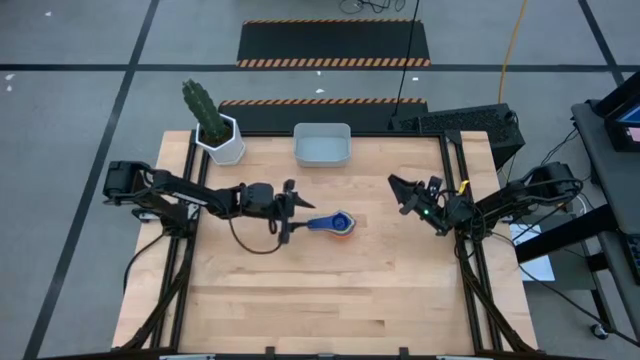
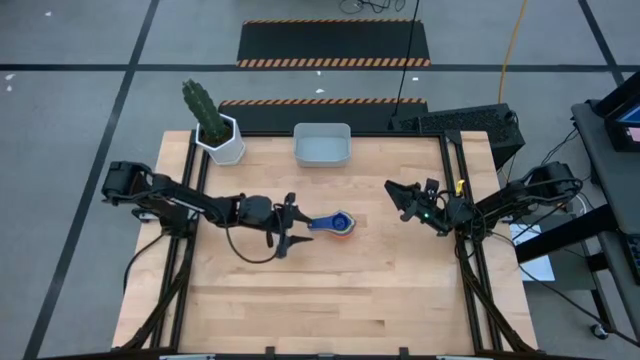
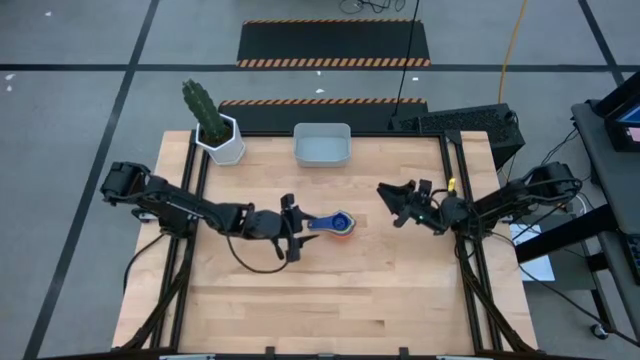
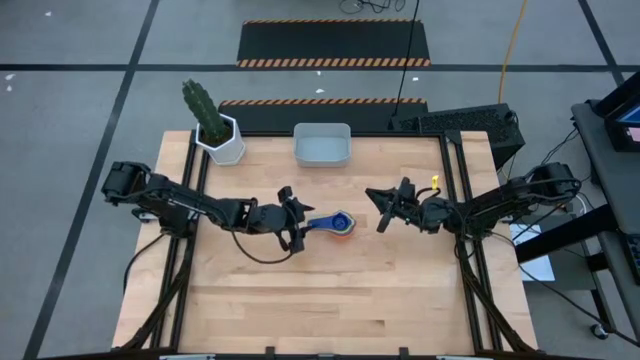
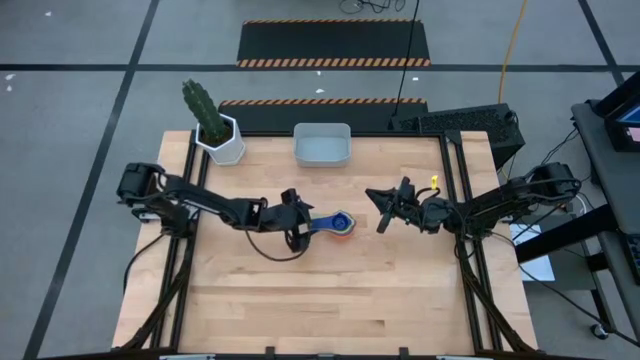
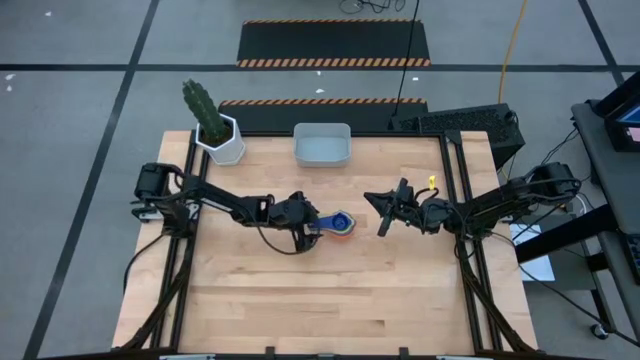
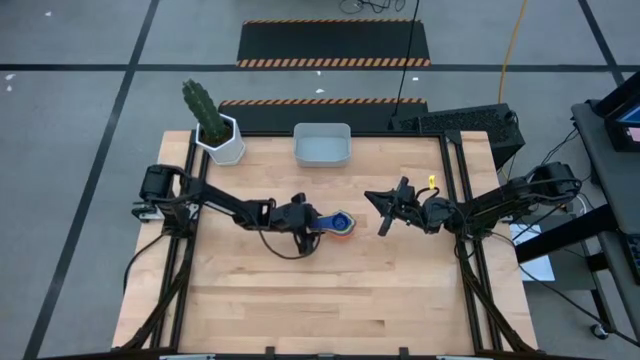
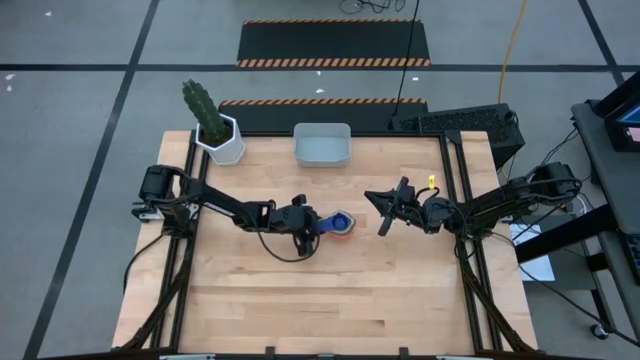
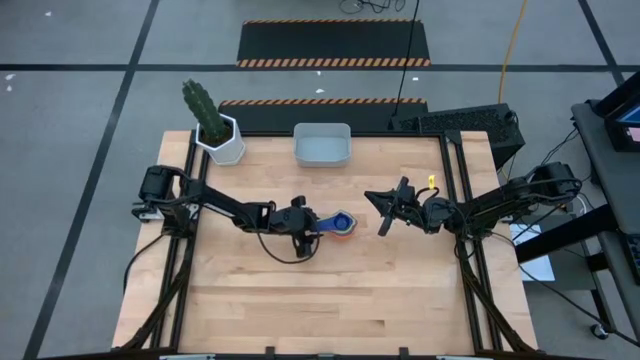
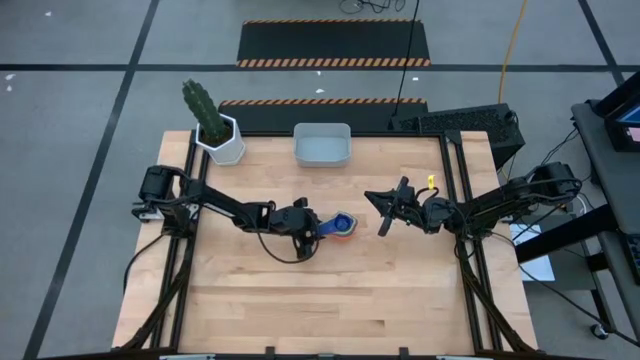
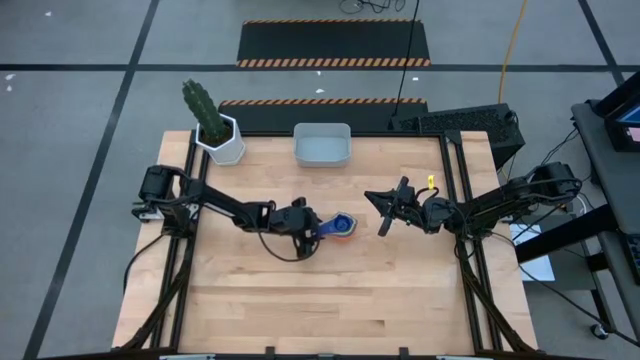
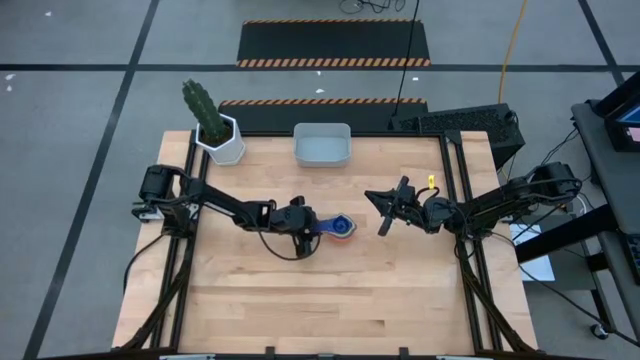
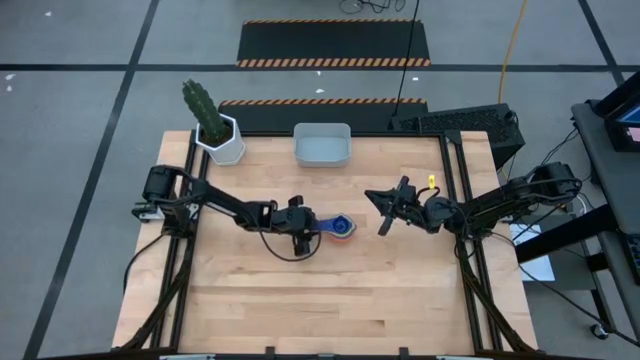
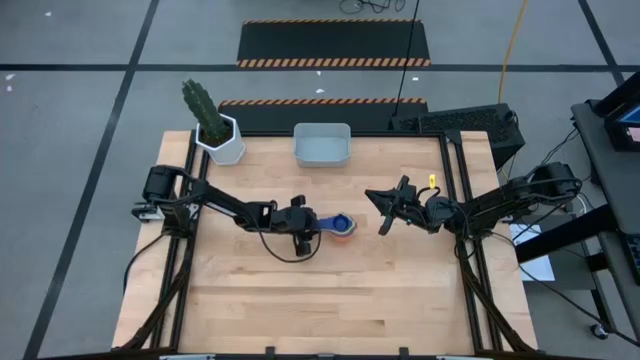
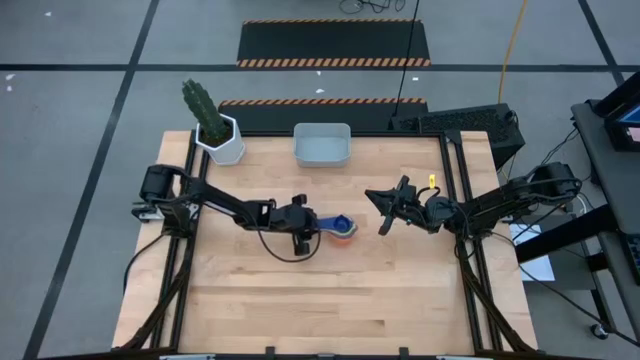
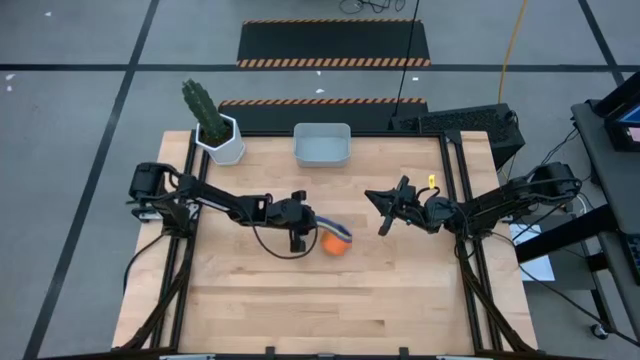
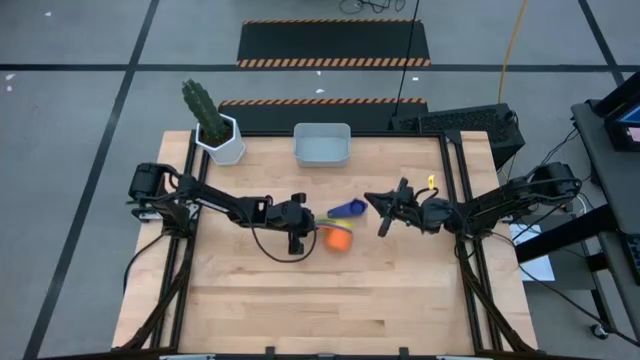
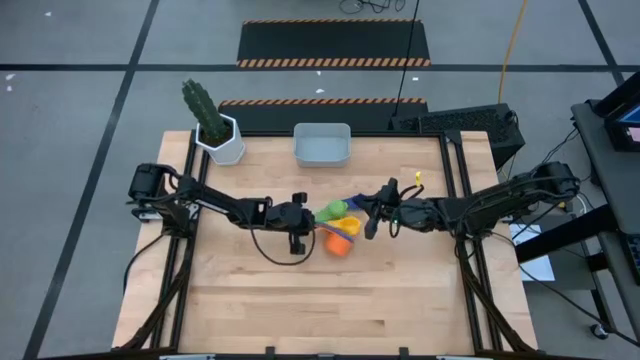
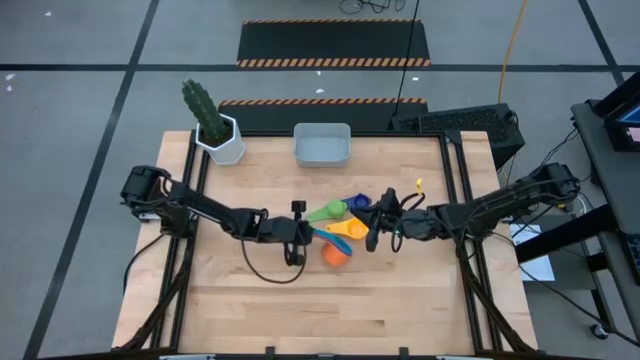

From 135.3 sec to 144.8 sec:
Task: Nest measuring cups in basket
Put the stacked measuring cups into the bin

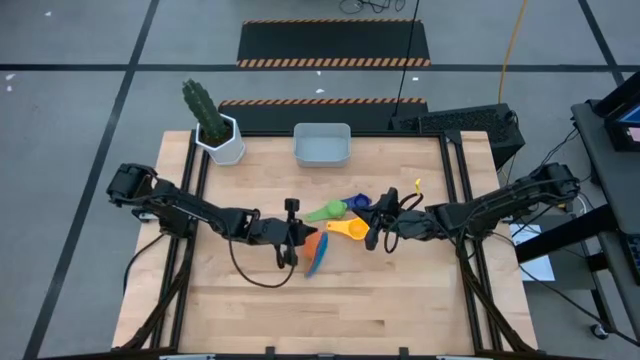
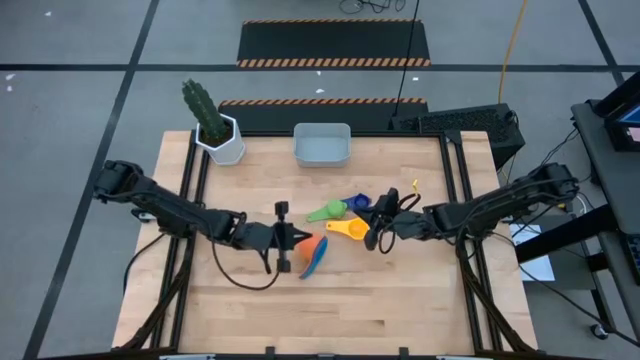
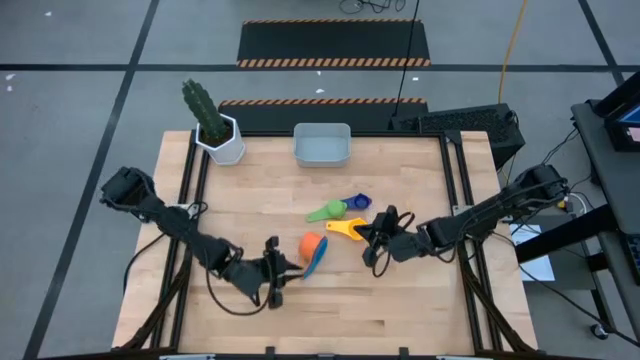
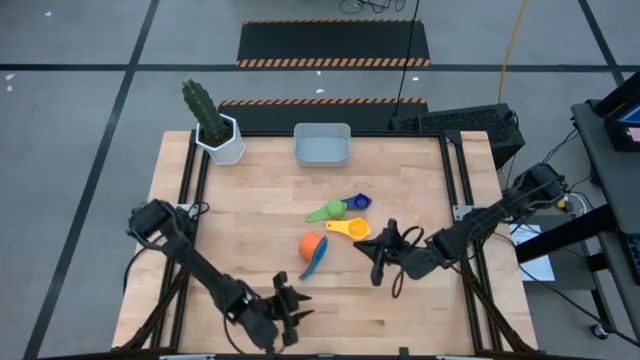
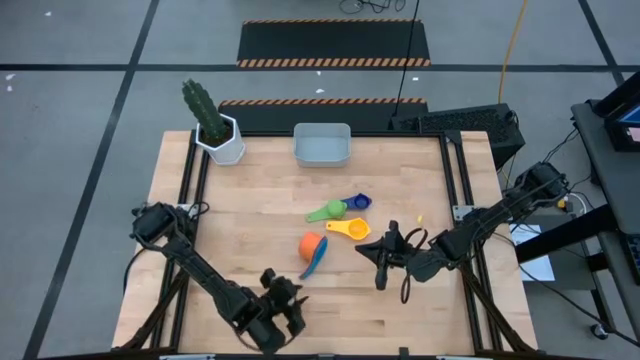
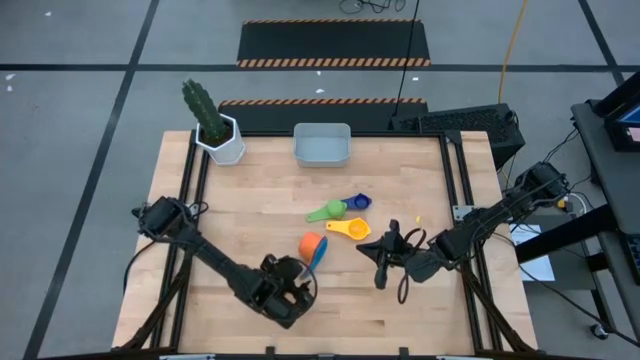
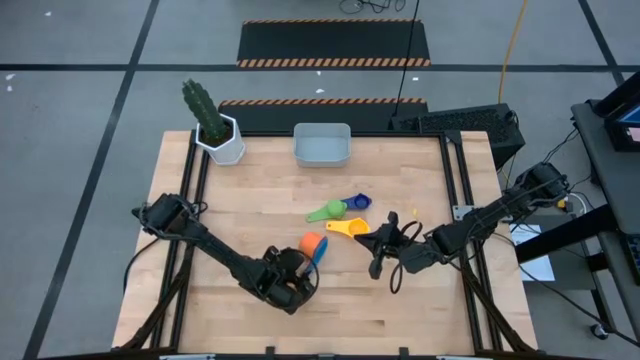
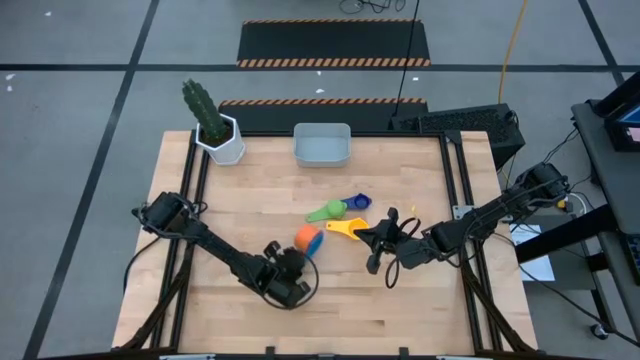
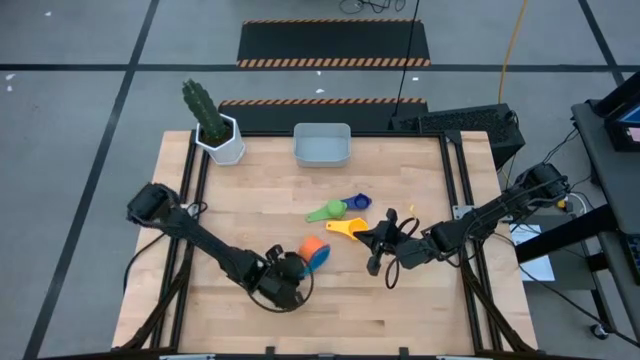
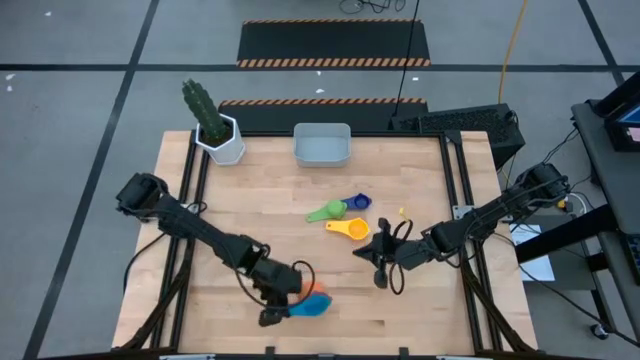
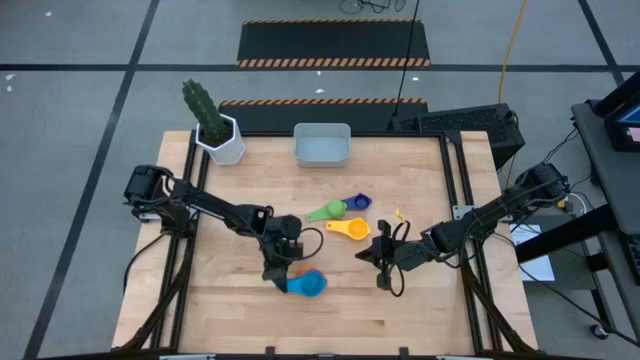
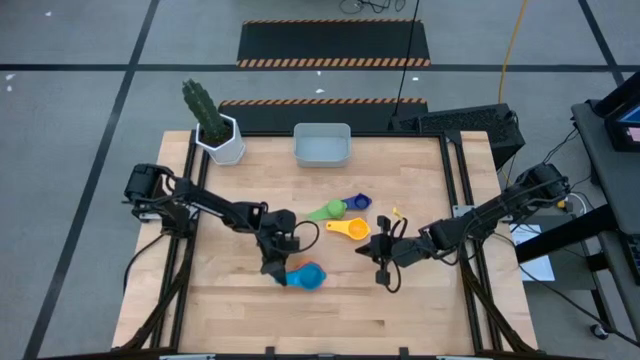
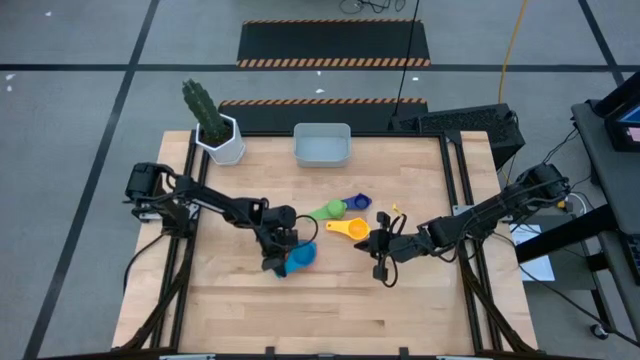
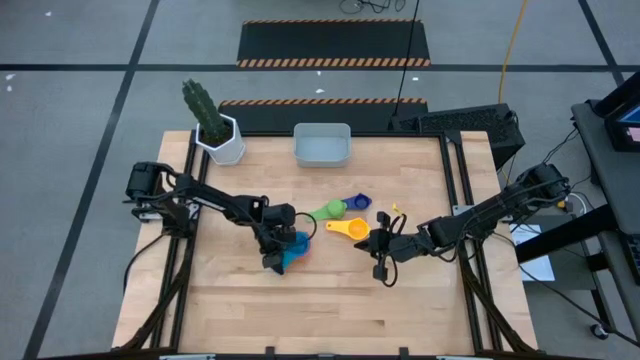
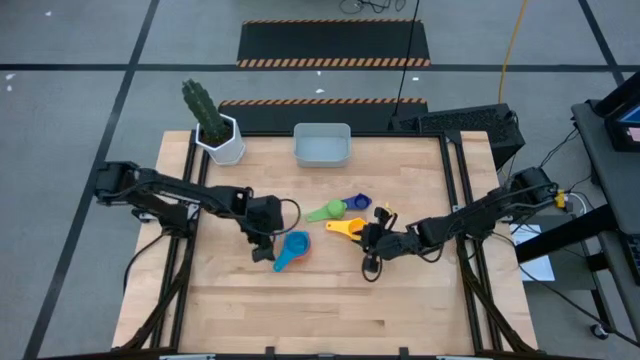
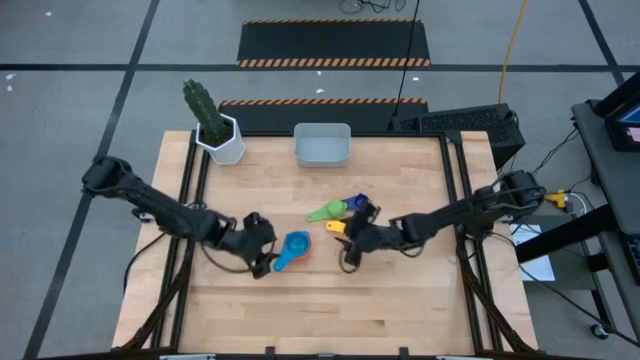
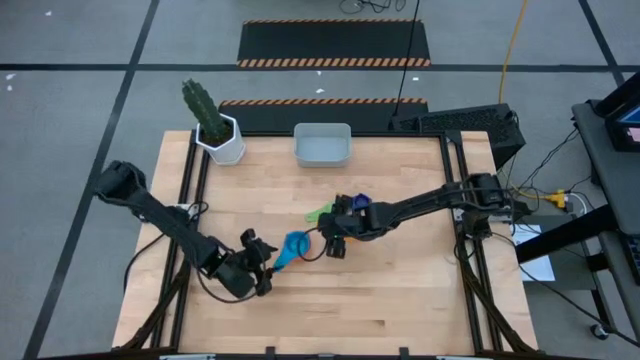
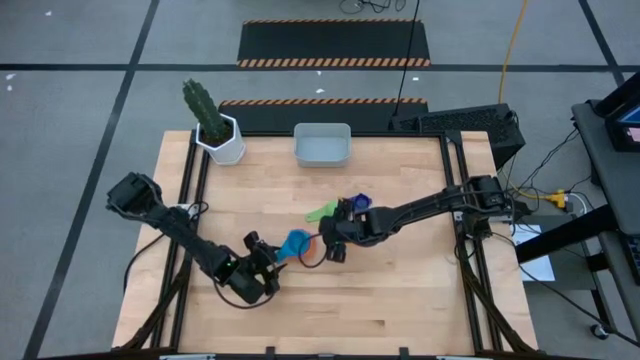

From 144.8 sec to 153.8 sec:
Adjust the stacked measuring cups to the correct position

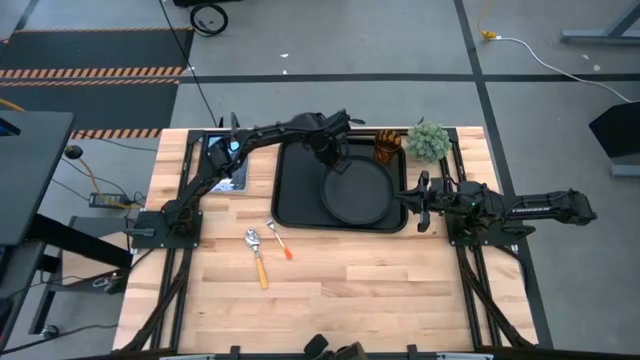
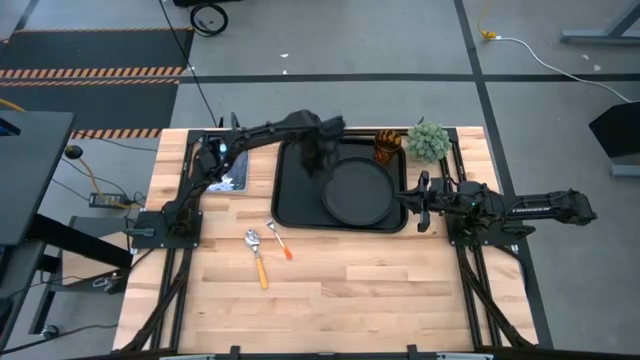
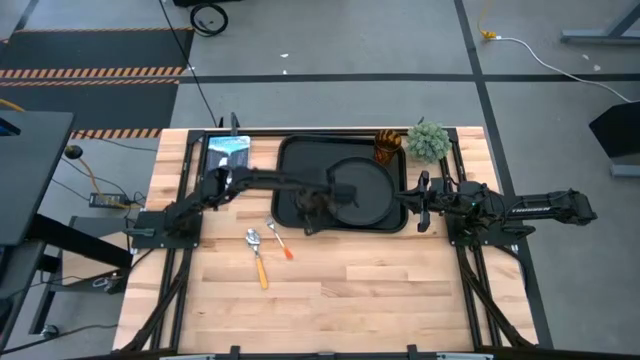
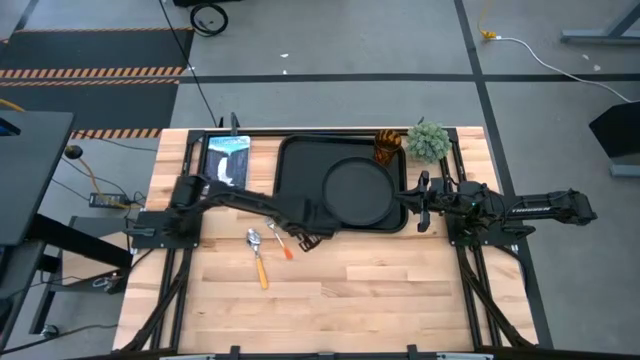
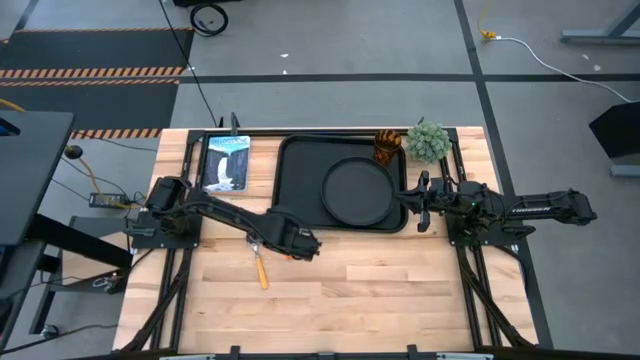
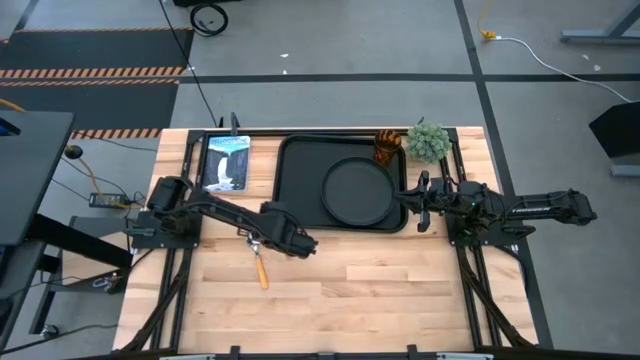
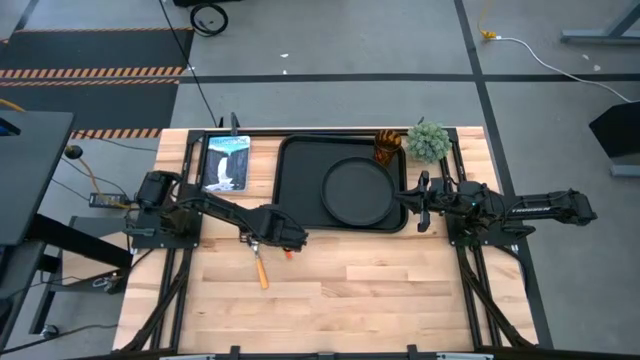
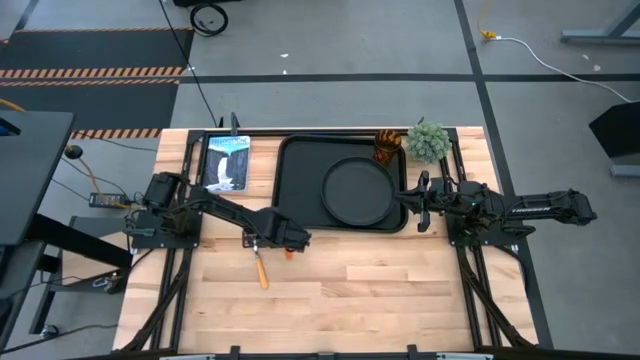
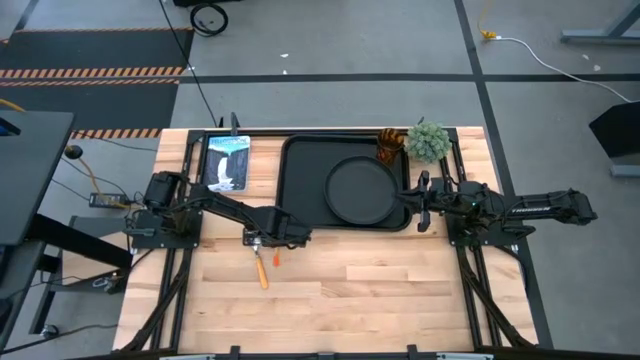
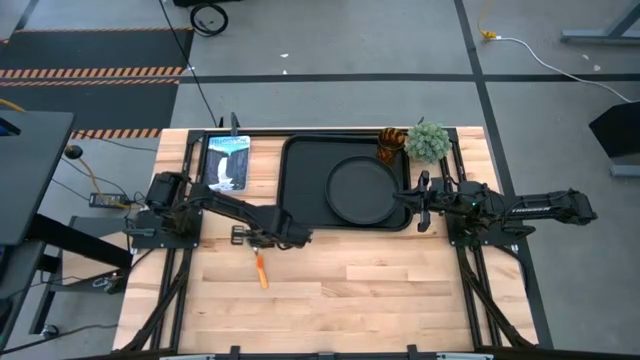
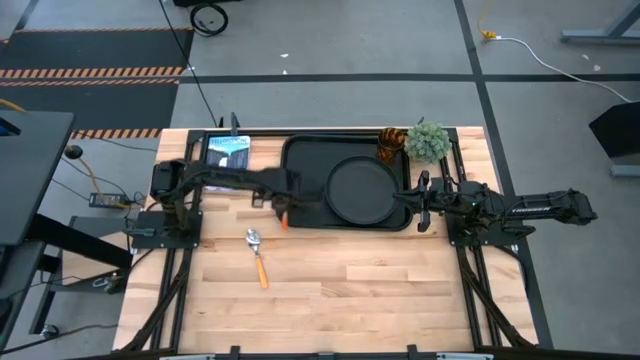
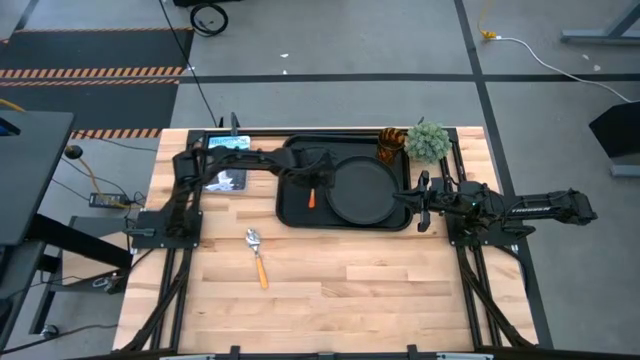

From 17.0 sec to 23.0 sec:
Task: Pick and place plate/cup/fork/spoon on tray
Put the orange fork on the black serving tray to the left of the black plate
